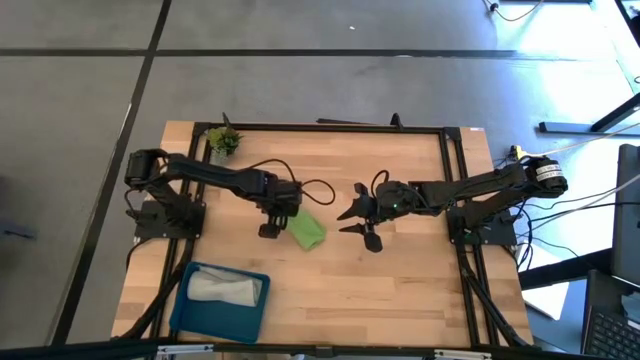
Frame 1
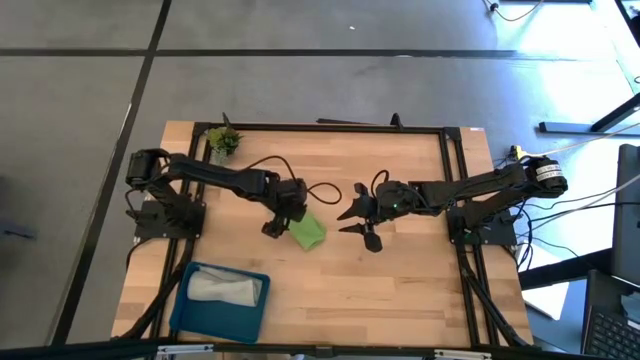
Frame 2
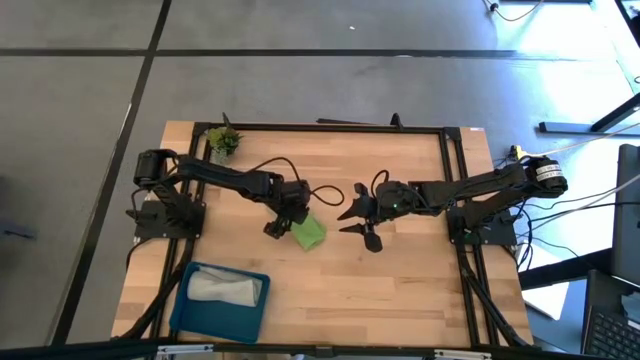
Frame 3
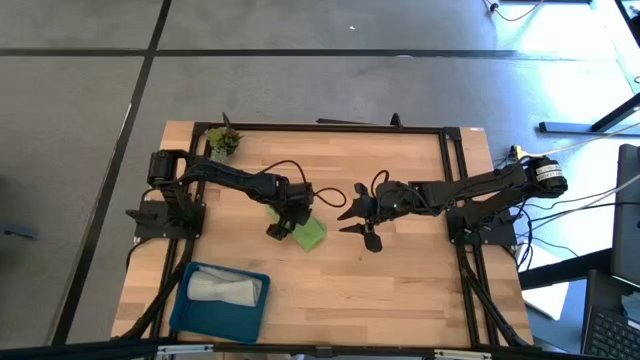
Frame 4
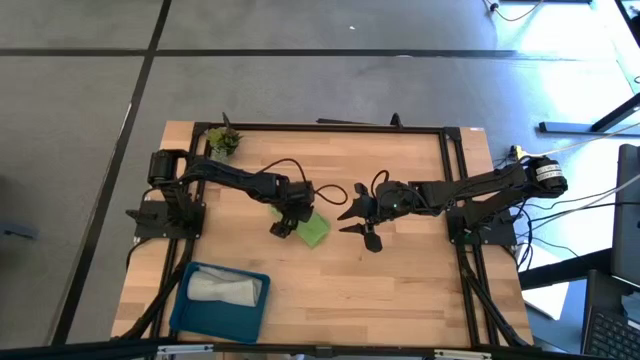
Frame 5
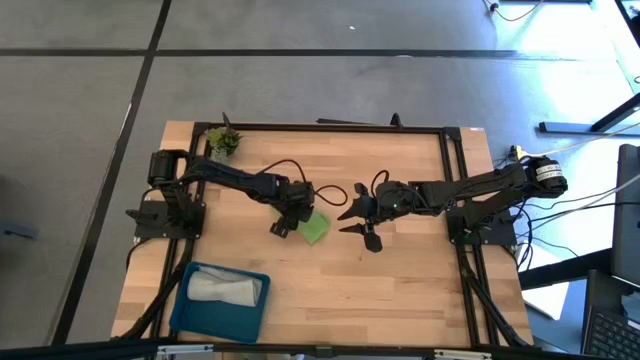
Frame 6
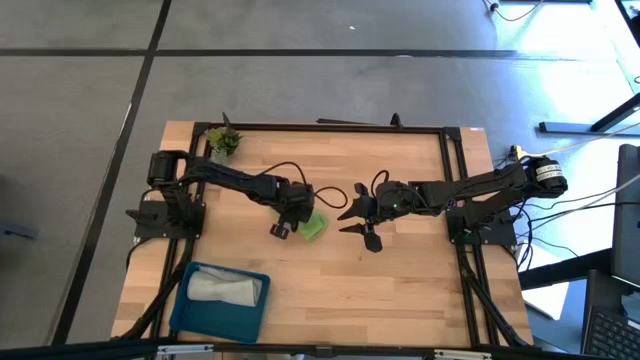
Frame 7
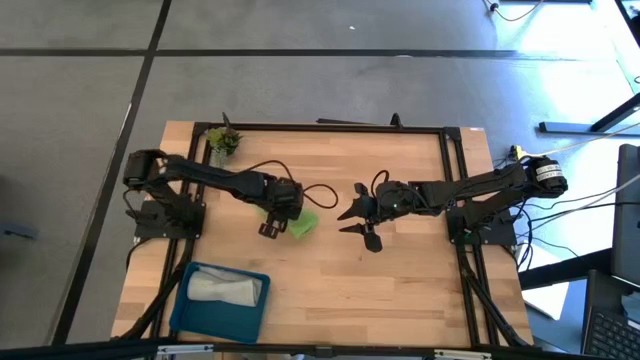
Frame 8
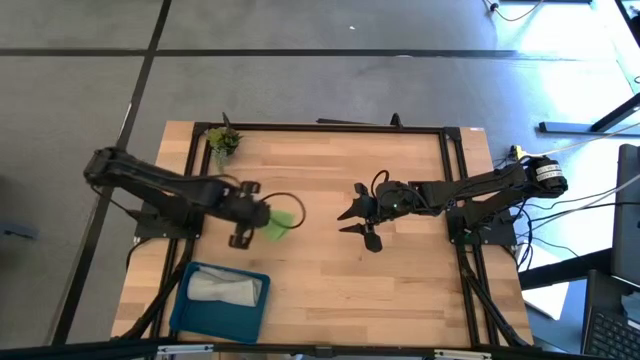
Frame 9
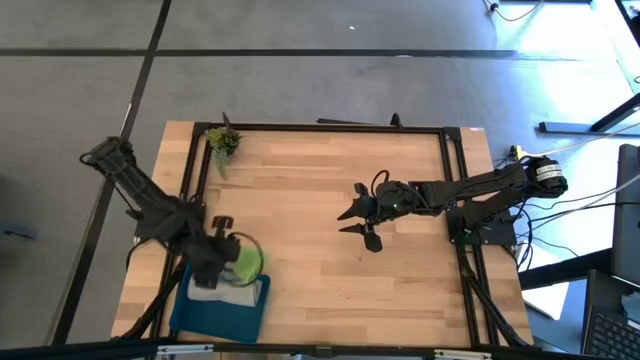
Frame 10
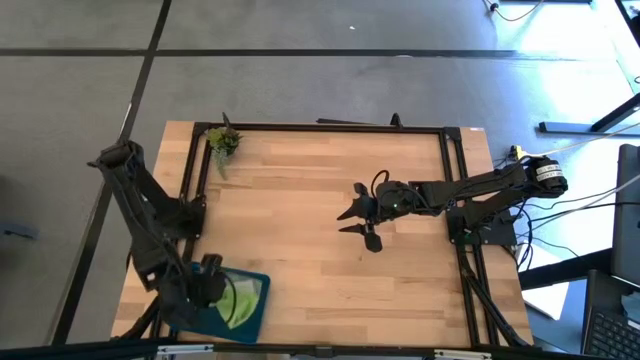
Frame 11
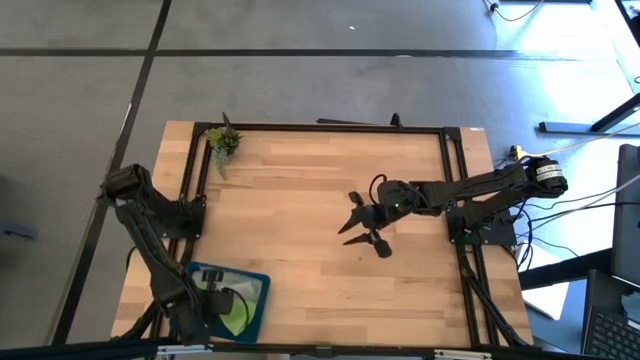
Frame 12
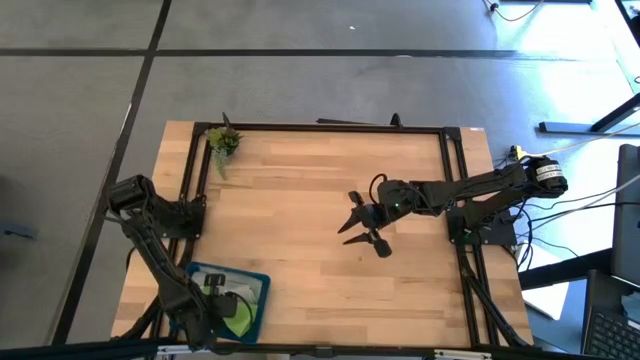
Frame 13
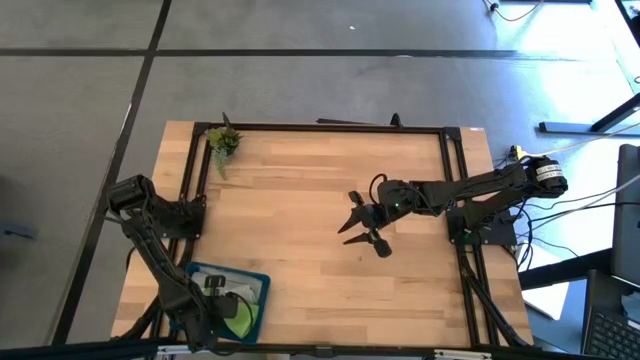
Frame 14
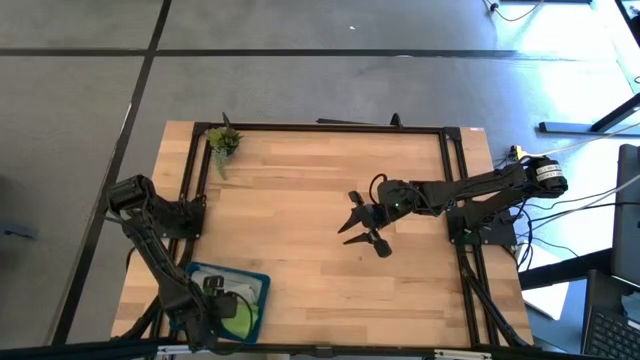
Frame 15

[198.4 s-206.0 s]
Task: Fold microfiber towels
Put the green microfiber cloth into the blue bin

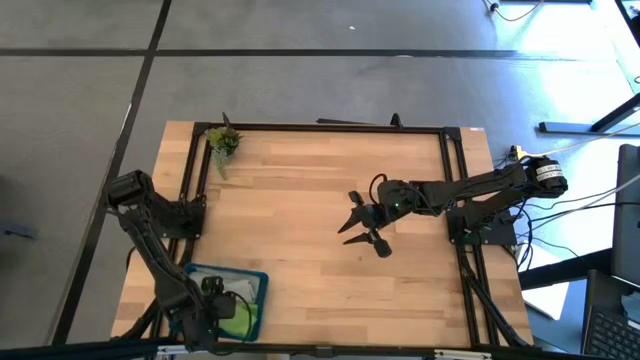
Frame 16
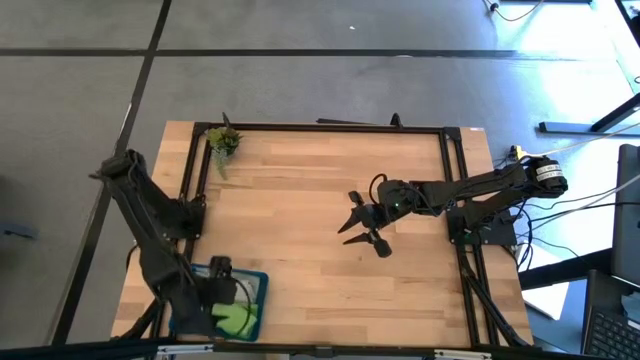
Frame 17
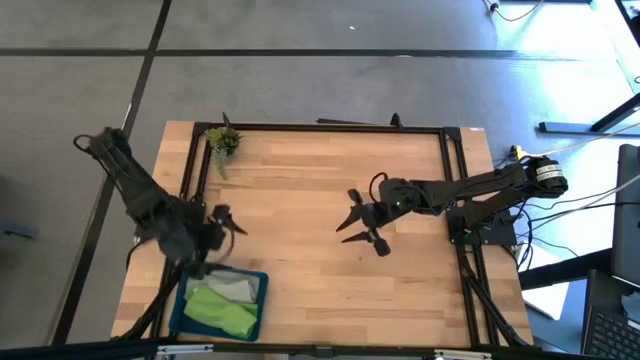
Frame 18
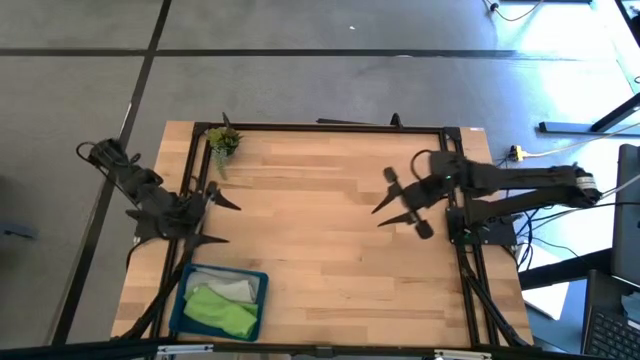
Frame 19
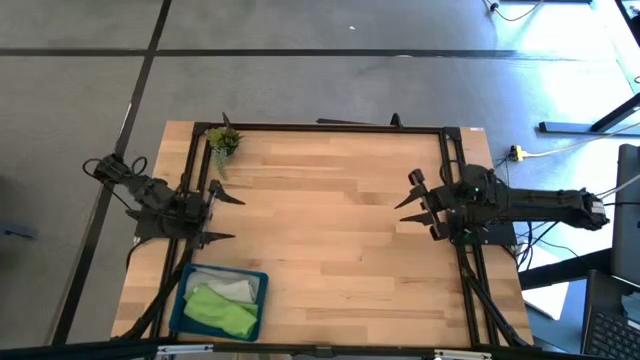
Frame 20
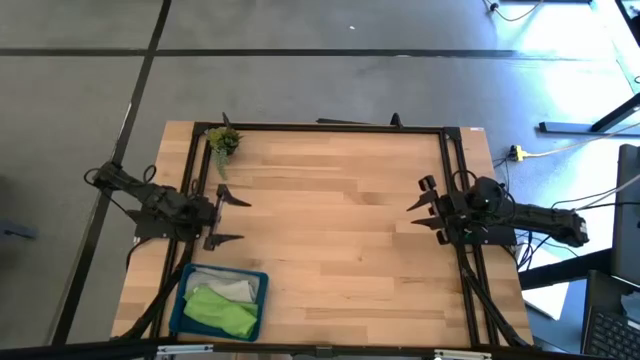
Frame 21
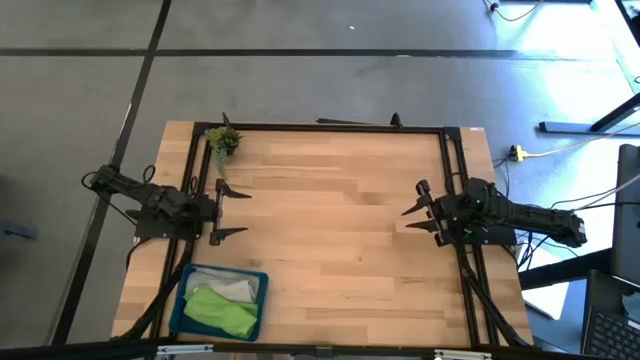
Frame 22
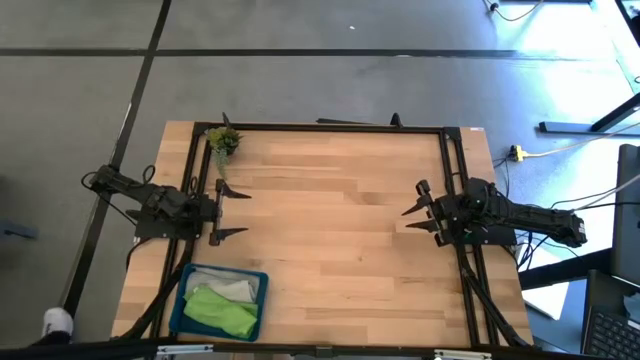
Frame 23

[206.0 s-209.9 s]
Return to Home Position

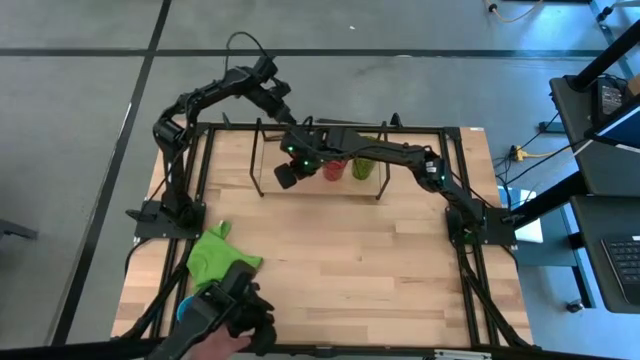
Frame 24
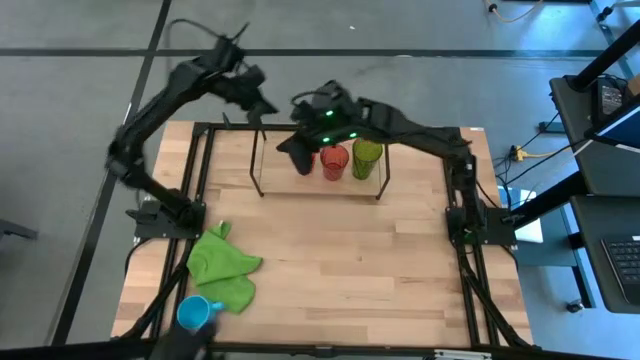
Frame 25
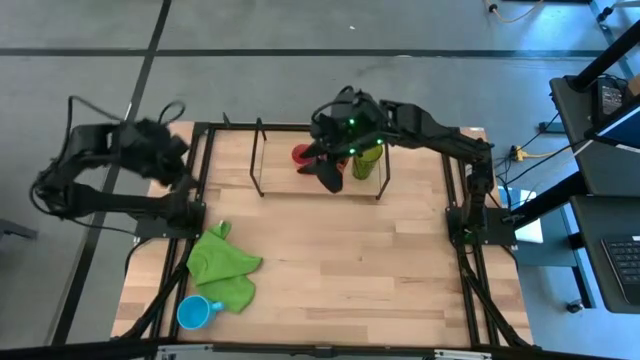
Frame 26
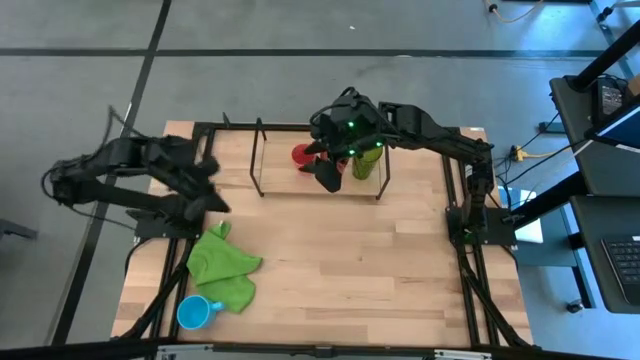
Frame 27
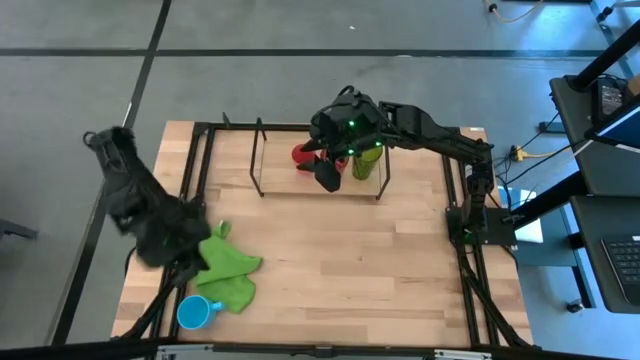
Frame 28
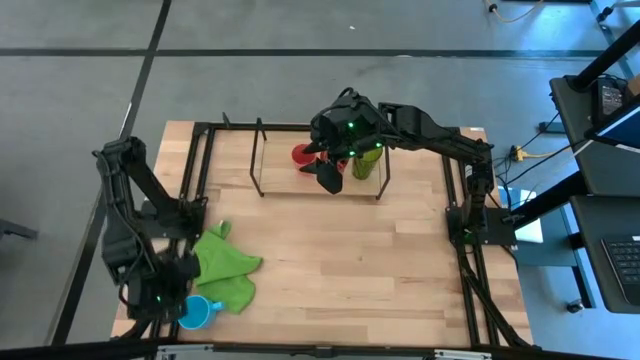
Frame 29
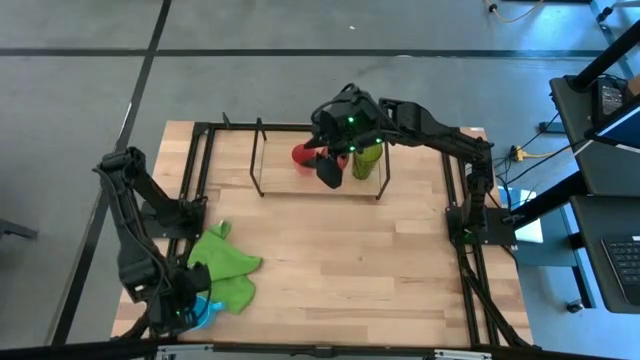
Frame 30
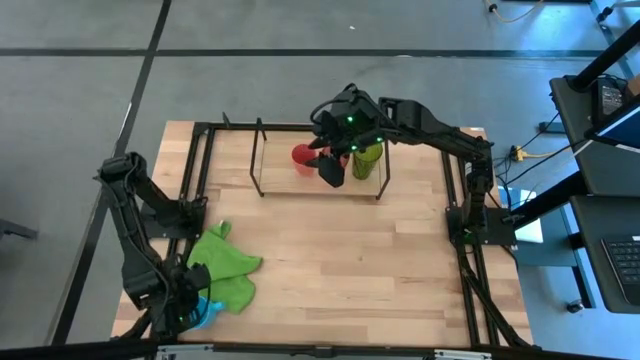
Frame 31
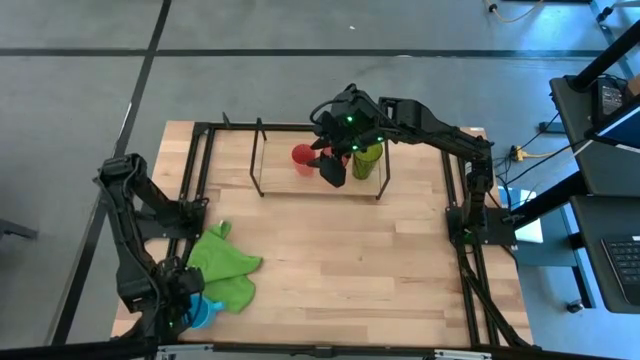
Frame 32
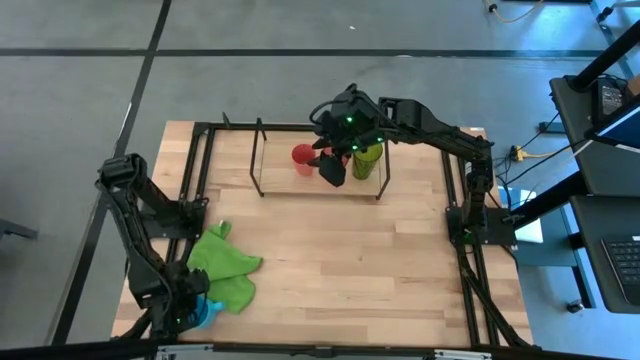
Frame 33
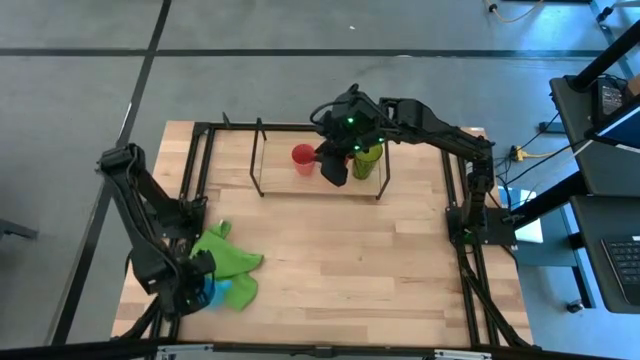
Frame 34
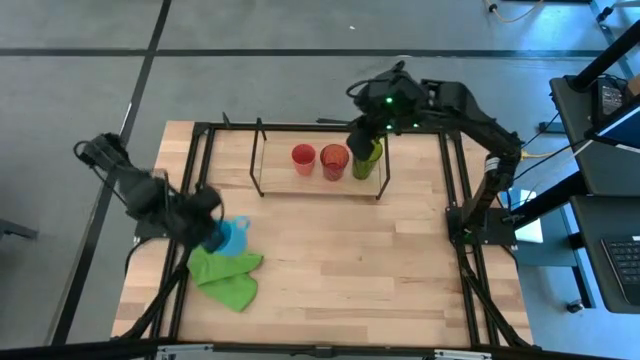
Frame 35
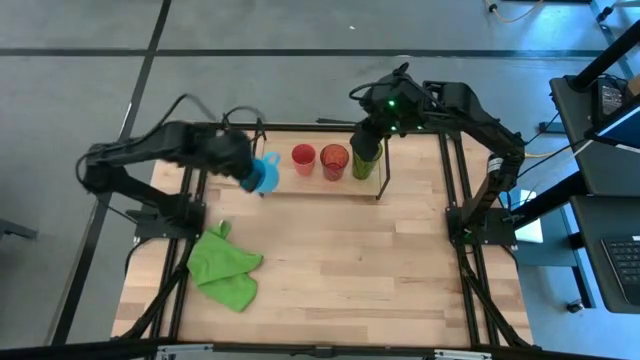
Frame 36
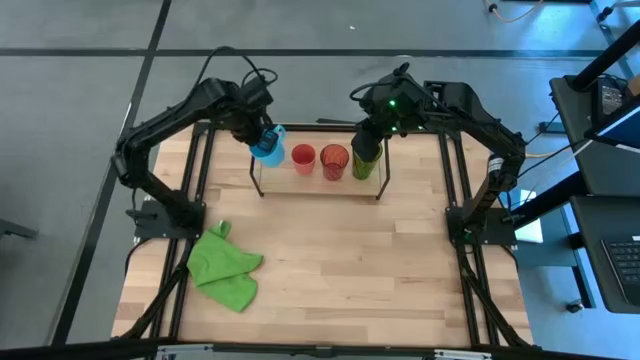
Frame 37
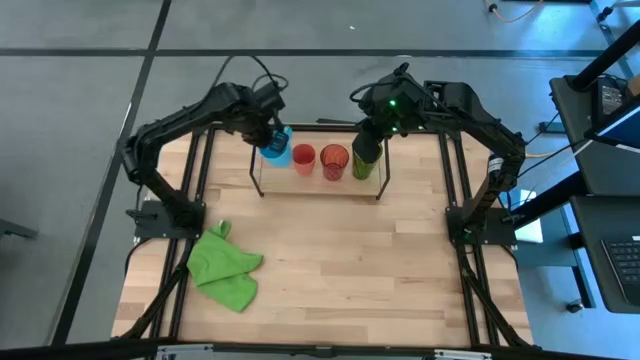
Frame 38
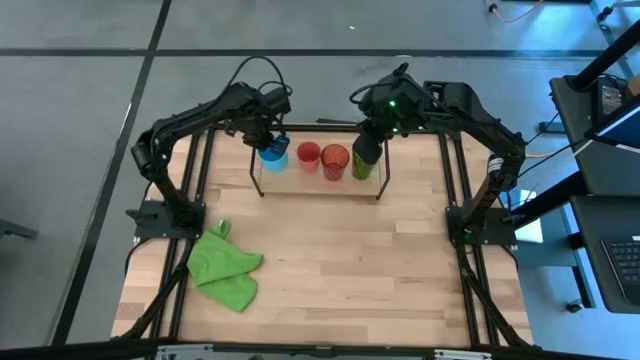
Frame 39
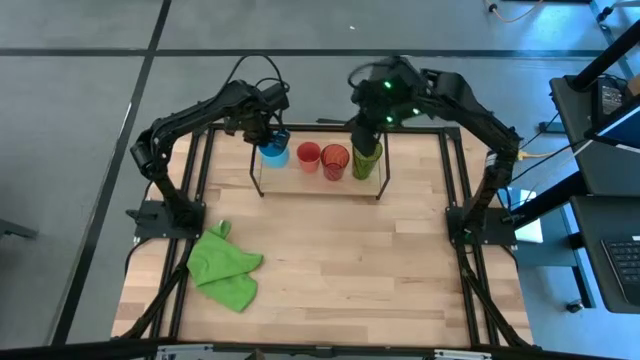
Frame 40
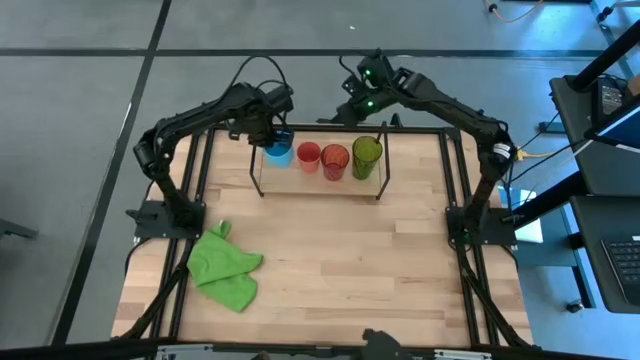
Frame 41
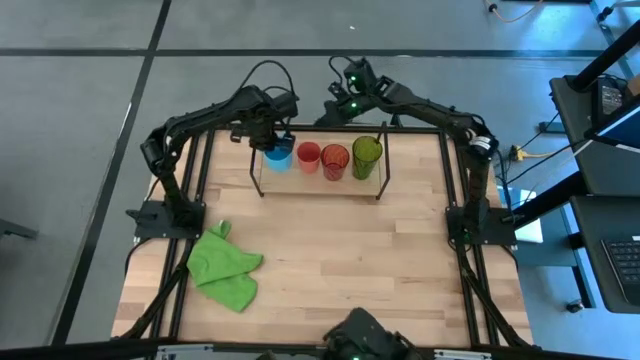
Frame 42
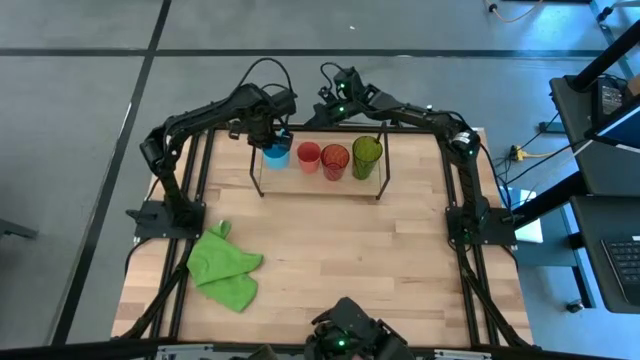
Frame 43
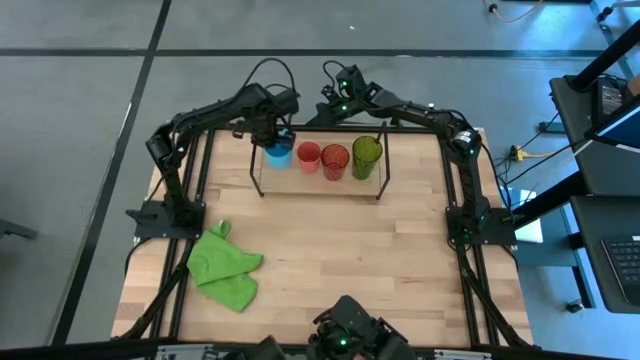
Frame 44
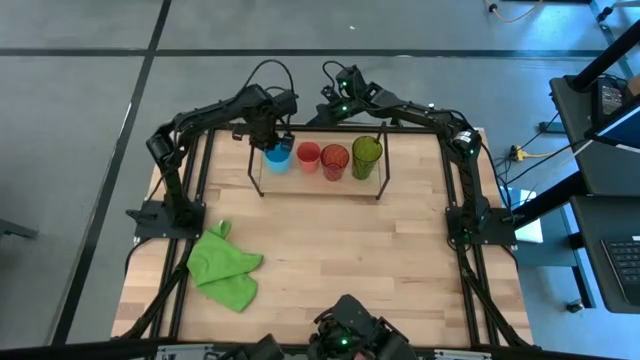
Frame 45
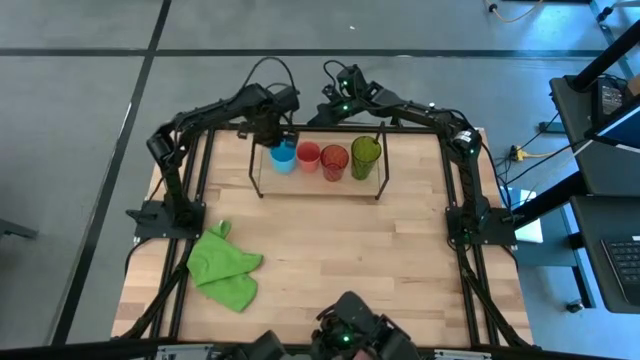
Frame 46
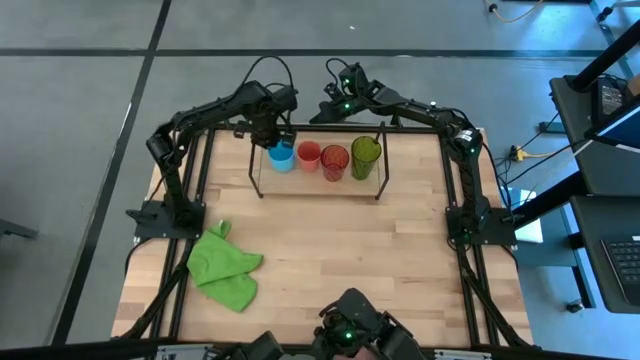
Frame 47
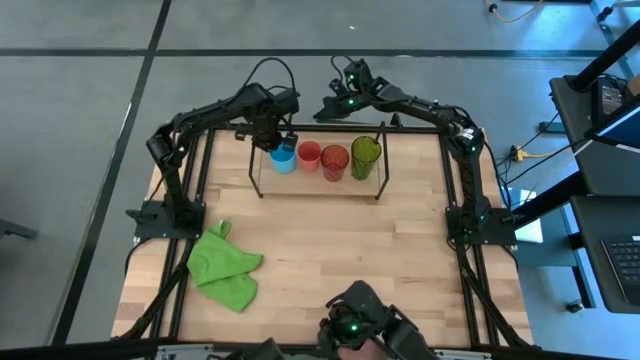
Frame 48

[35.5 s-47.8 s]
Task: Stack small to large cups/mugs on shelf
Put the blue mug on the shelf
